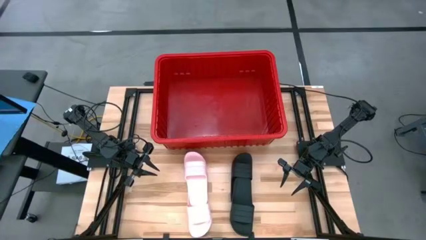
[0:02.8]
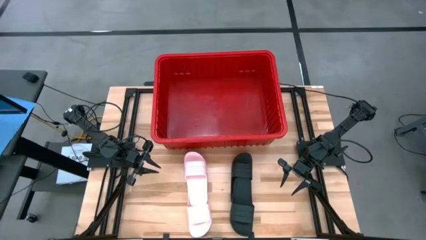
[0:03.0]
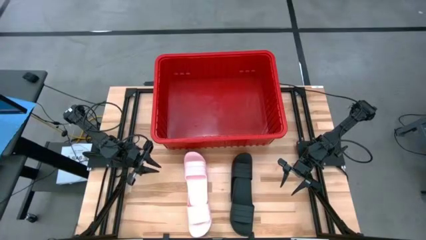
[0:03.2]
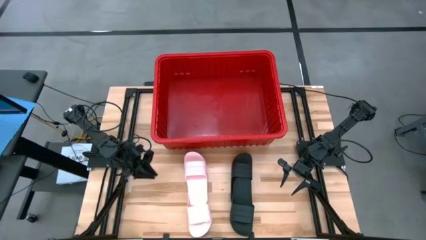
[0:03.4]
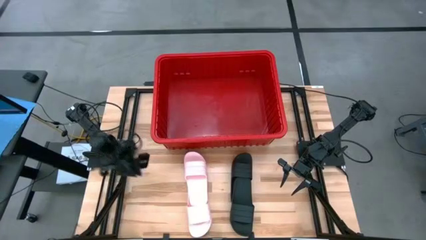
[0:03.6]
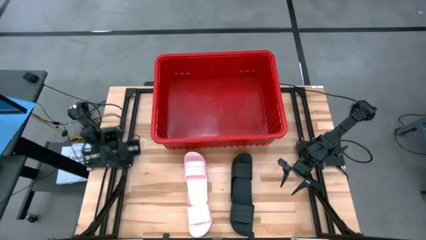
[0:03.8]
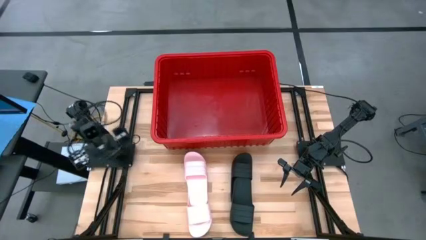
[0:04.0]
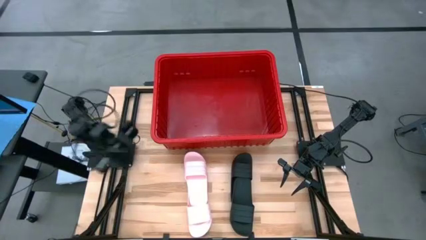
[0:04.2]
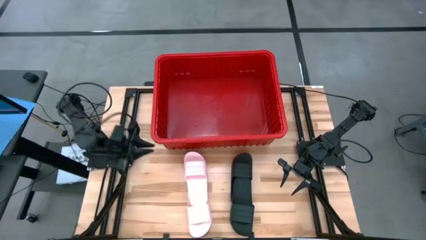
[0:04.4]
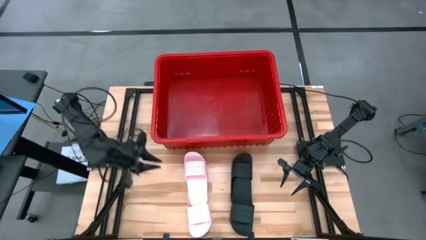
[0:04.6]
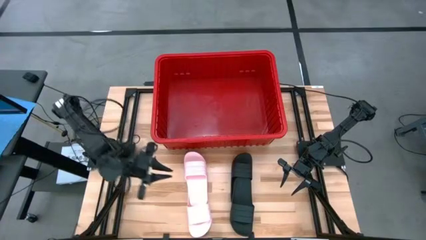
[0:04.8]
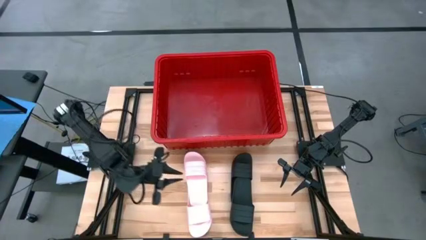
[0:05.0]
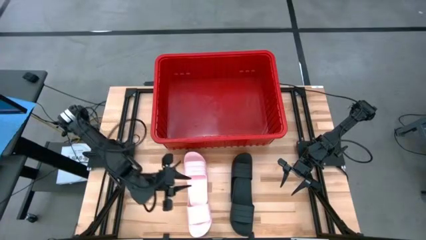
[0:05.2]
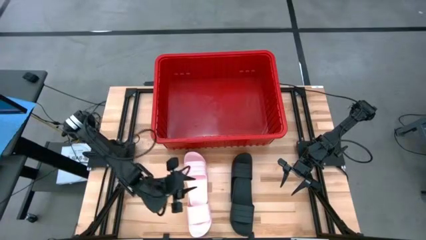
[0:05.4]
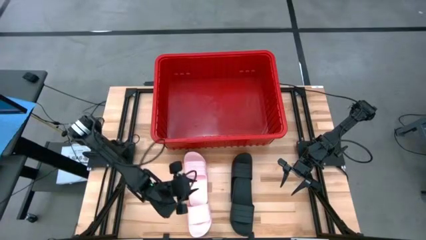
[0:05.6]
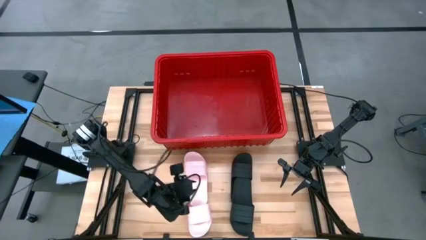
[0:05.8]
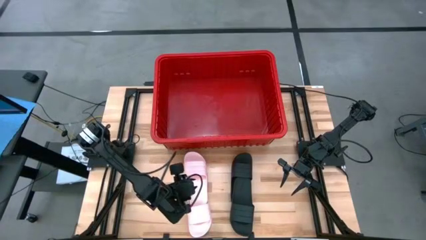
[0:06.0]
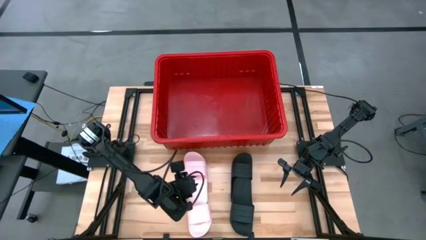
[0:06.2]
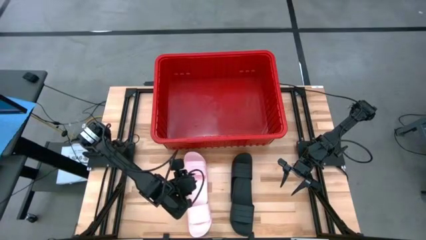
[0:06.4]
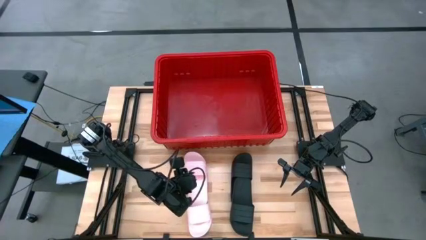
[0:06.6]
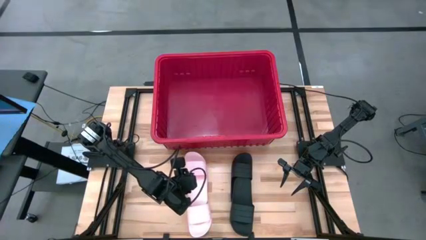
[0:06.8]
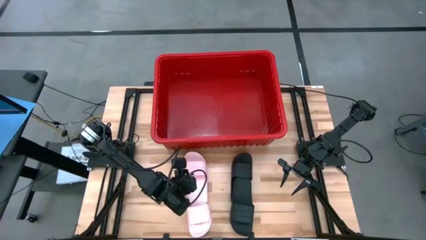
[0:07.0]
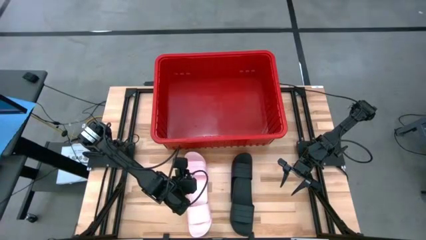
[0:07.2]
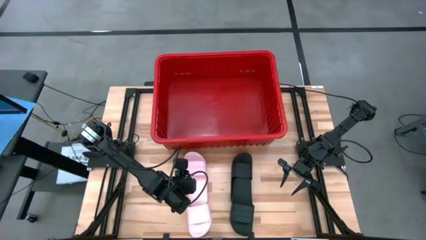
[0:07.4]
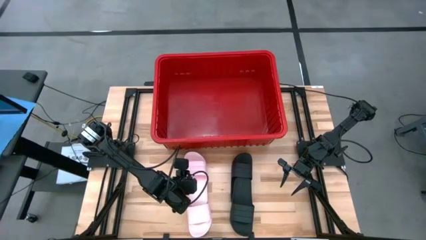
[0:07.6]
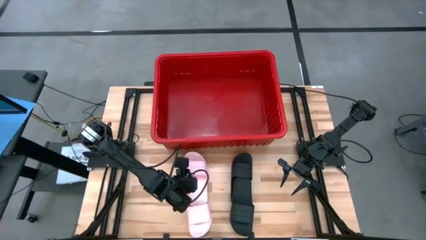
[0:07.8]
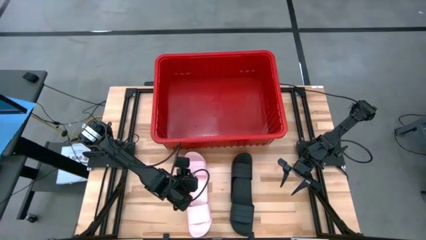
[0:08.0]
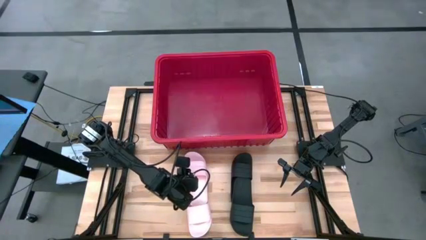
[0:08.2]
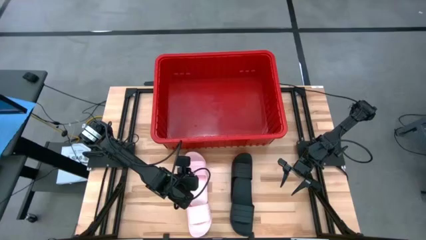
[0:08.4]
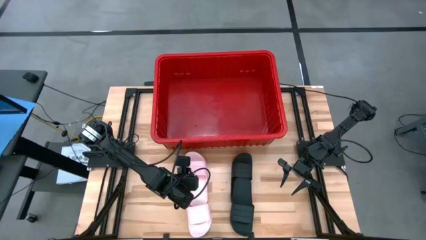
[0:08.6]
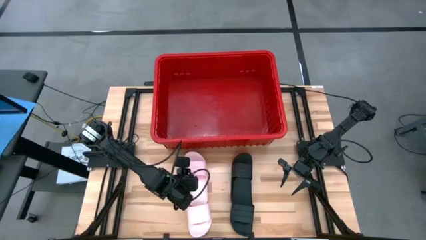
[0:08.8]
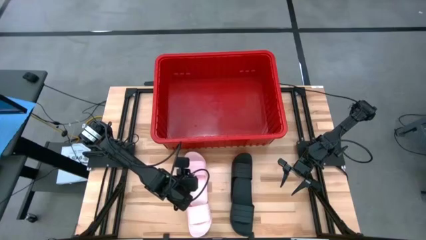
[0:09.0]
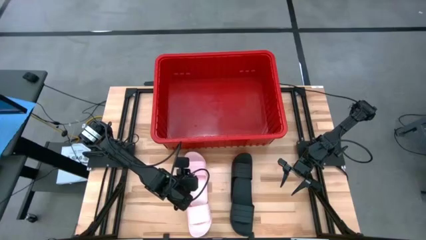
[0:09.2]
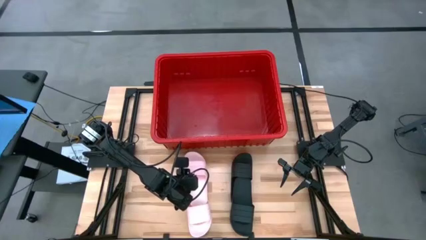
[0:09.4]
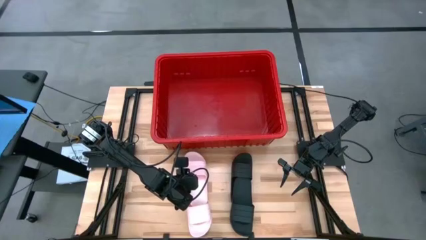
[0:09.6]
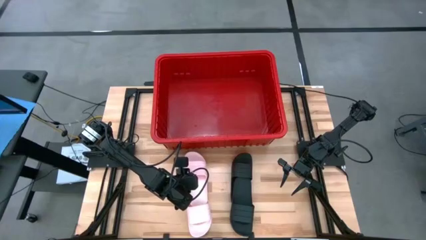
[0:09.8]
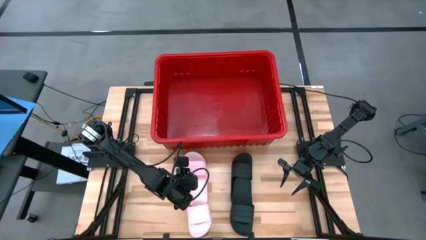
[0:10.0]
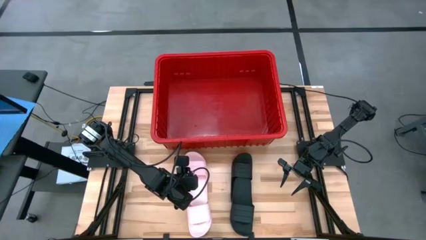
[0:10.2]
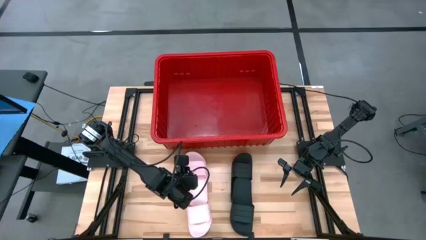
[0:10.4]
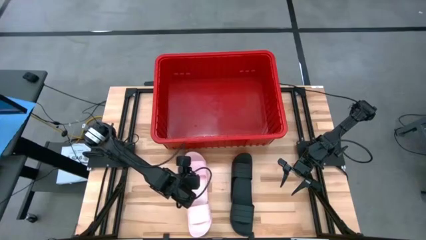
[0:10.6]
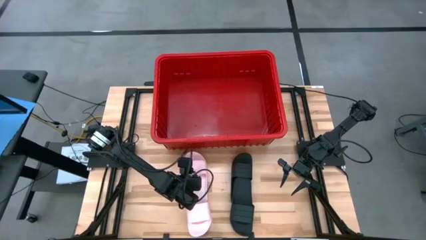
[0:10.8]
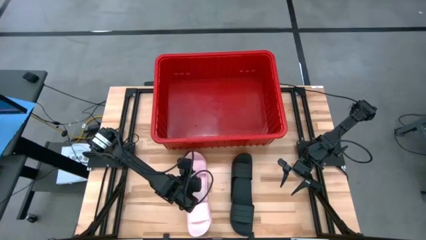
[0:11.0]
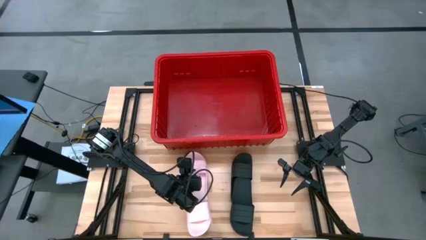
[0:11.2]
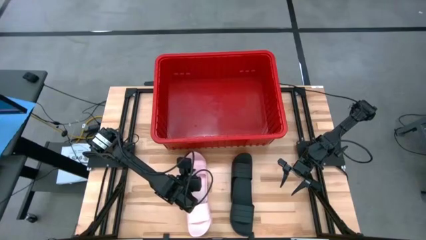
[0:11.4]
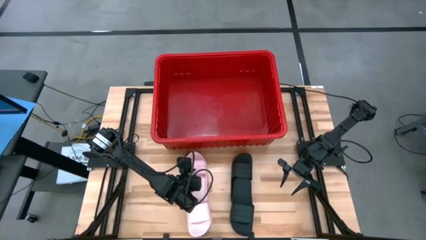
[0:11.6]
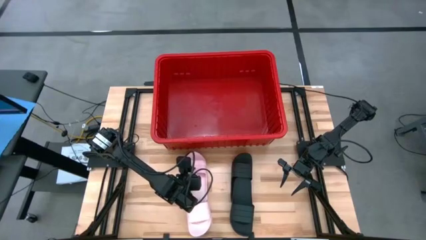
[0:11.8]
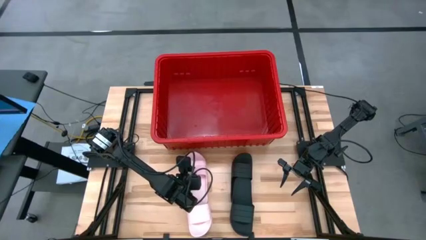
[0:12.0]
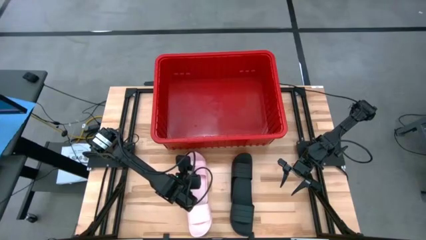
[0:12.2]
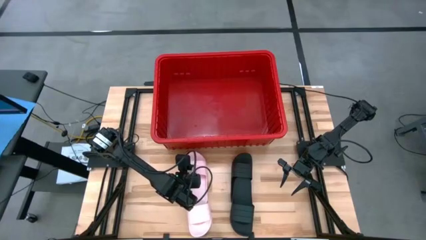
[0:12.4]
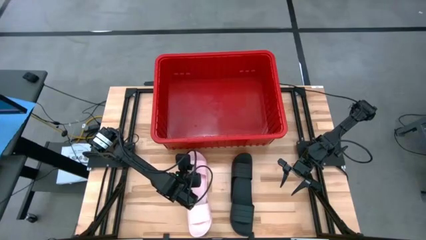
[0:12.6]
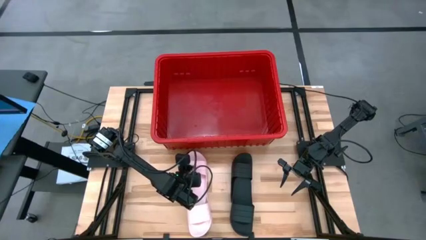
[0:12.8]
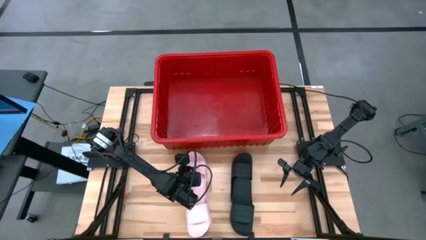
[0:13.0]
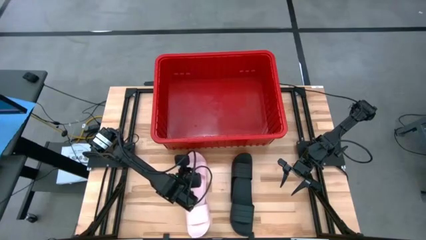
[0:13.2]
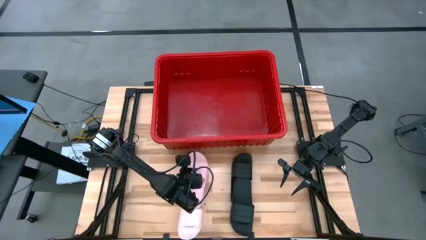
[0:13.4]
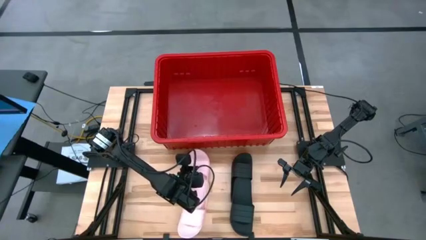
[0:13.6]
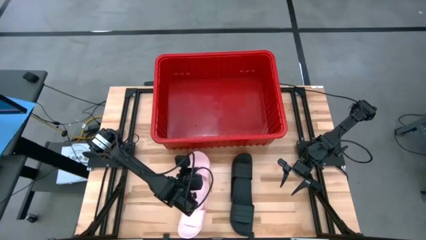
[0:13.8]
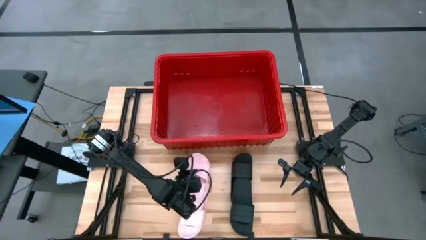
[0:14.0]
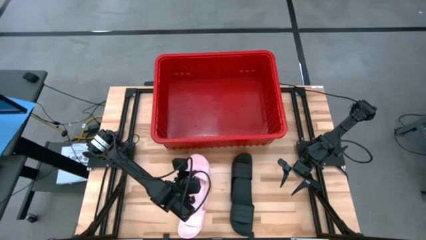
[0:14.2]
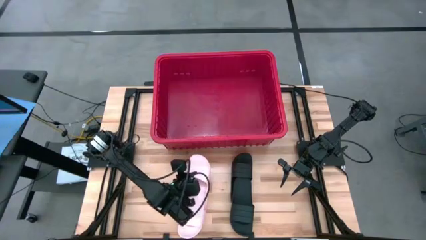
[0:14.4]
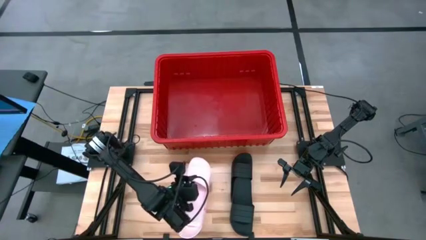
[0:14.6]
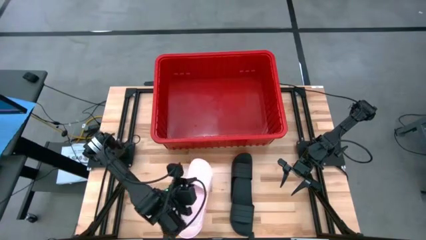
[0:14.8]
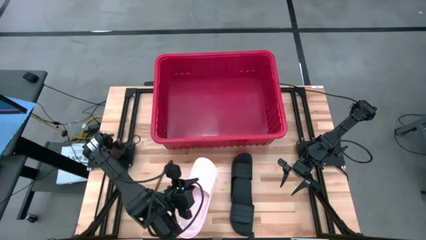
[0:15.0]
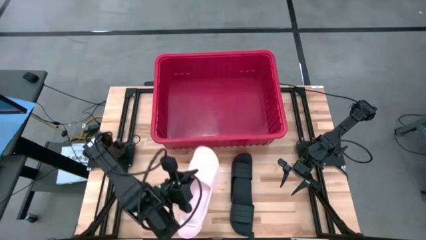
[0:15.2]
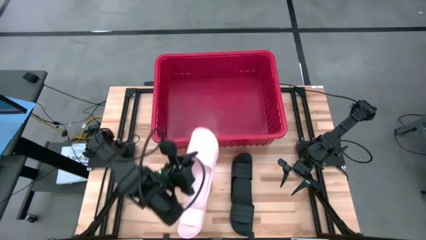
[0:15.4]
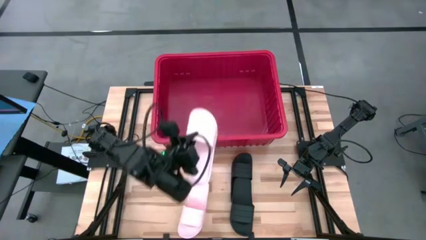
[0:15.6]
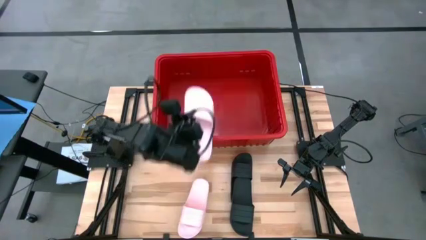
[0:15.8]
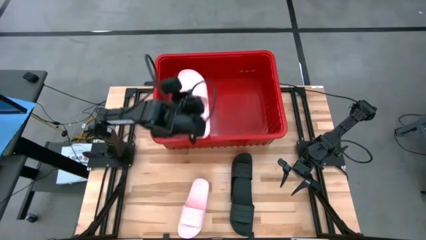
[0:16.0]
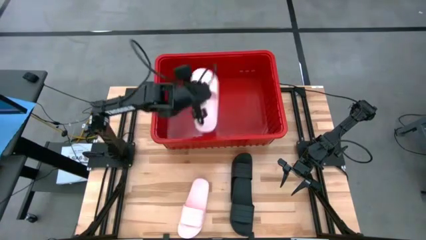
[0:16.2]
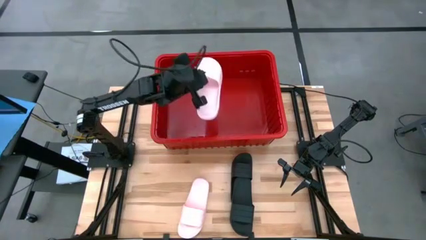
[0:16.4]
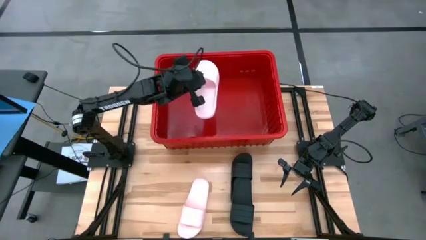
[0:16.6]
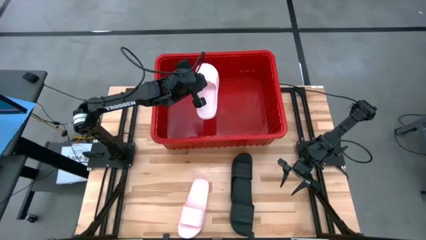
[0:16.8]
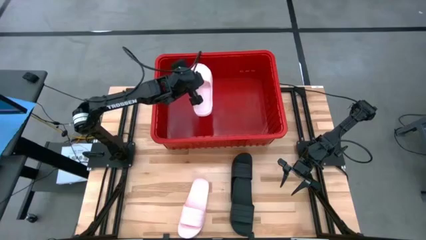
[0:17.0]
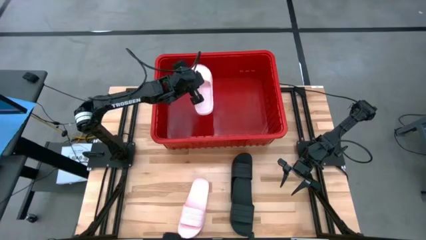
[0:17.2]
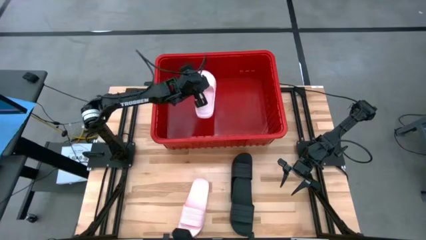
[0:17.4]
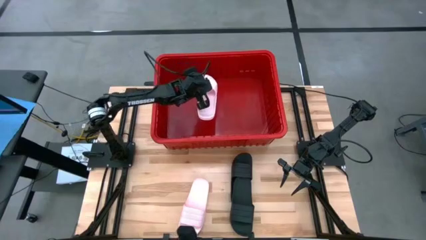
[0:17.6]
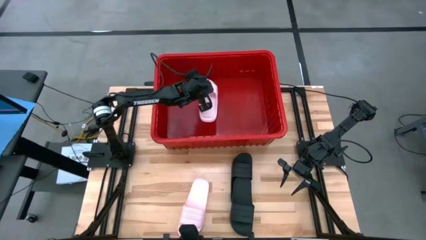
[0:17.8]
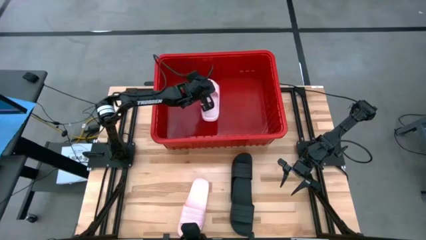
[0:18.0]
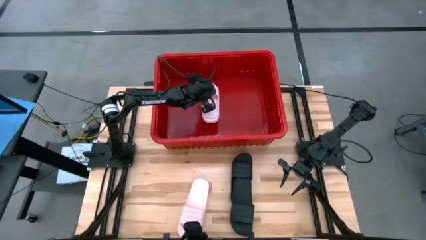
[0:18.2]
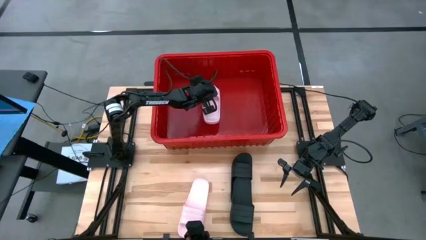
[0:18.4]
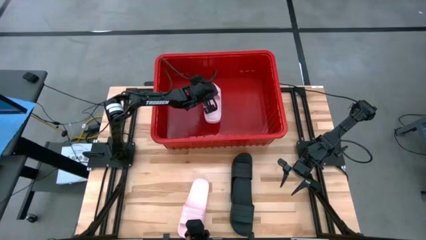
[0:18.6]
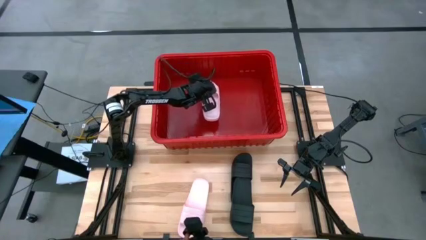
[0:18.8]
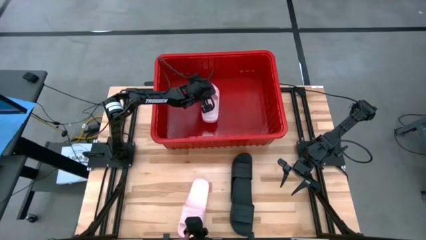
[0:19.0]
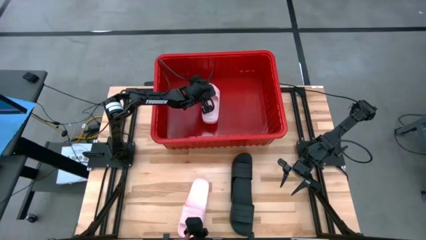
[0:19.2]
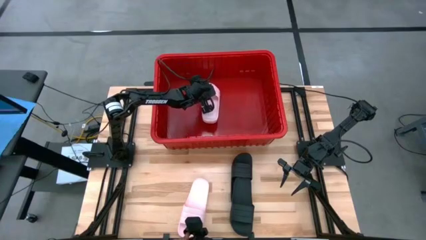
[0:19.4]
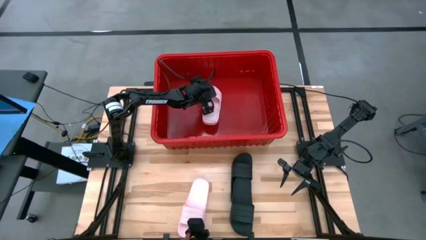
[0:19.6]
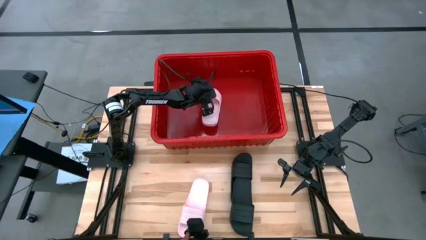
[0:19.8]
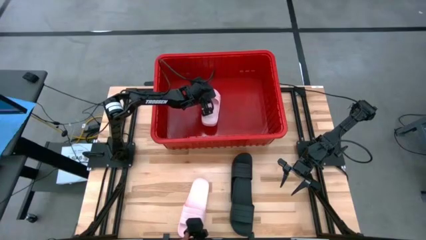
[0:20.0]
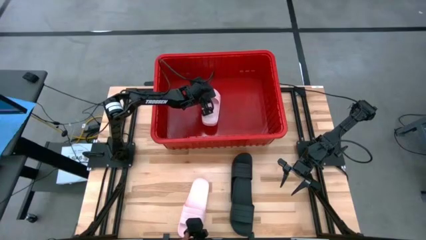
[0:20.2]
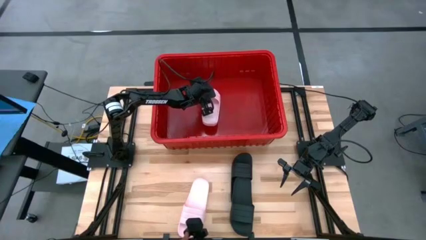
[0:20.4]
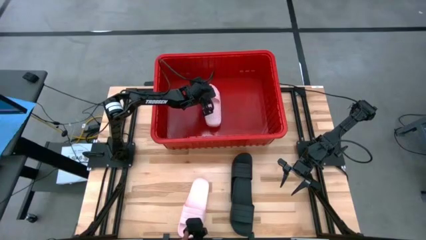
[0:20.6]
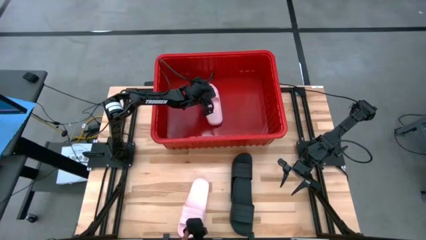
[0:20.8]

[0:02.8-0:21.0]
Task: Pick and place slides into bin
Put the top pink slipper in the red bin
